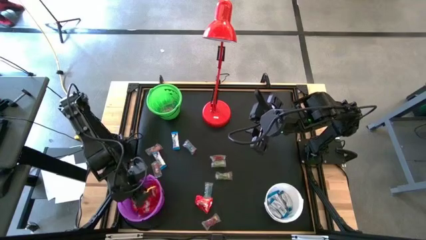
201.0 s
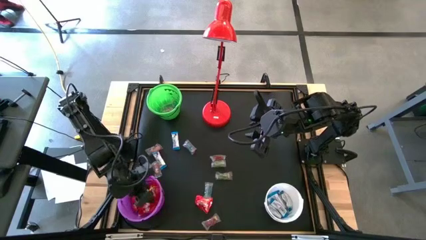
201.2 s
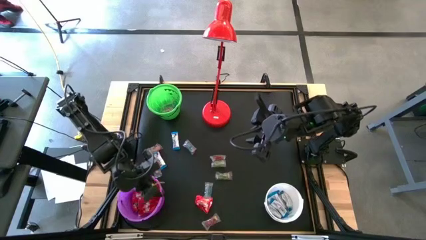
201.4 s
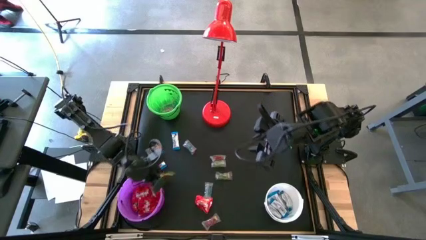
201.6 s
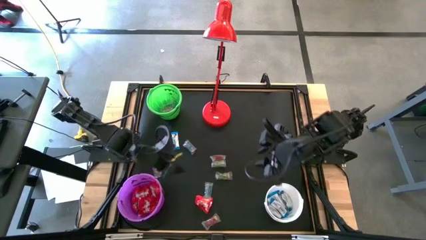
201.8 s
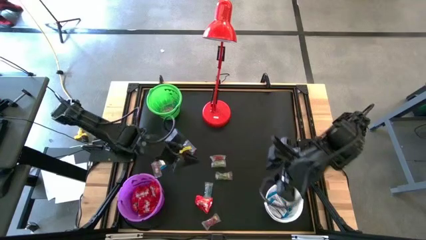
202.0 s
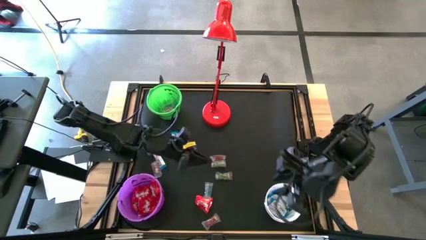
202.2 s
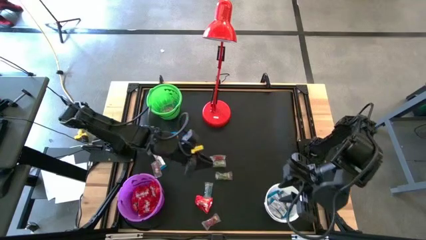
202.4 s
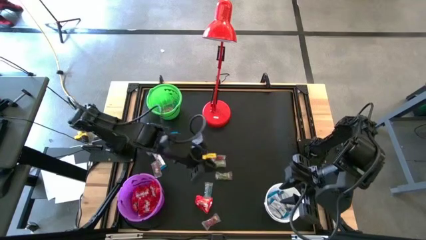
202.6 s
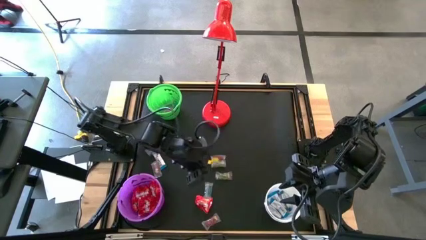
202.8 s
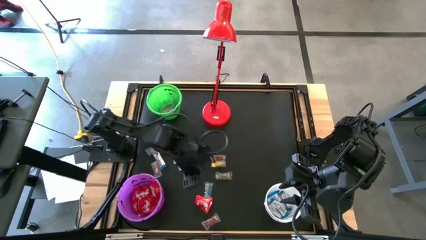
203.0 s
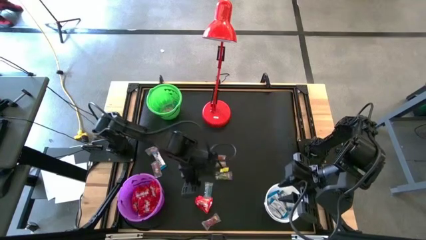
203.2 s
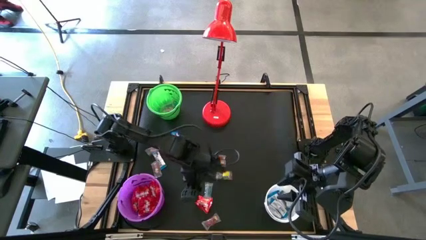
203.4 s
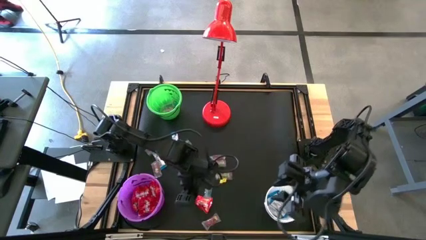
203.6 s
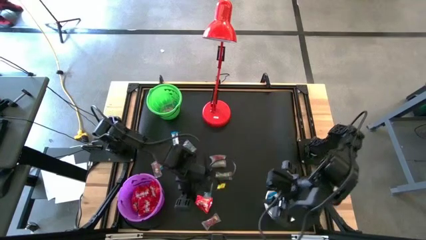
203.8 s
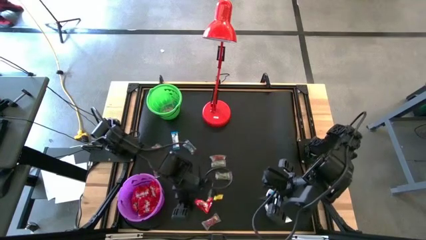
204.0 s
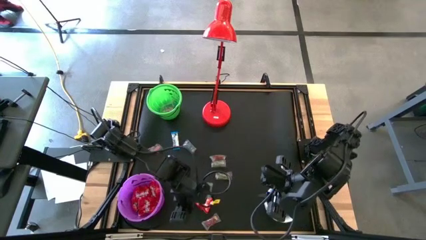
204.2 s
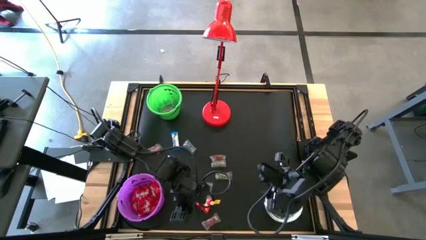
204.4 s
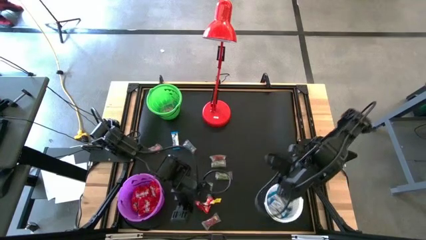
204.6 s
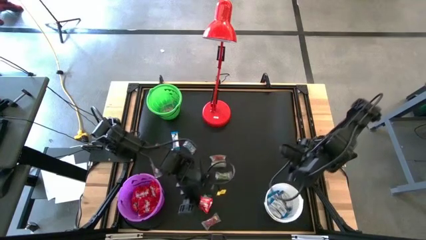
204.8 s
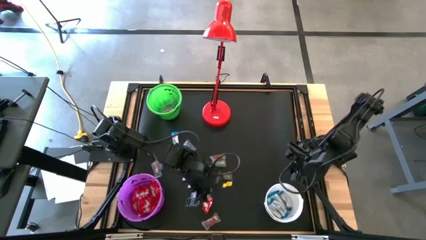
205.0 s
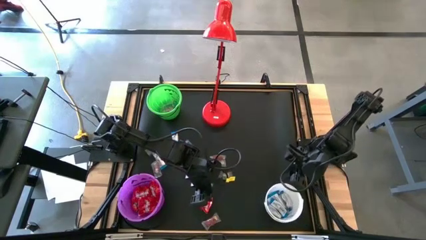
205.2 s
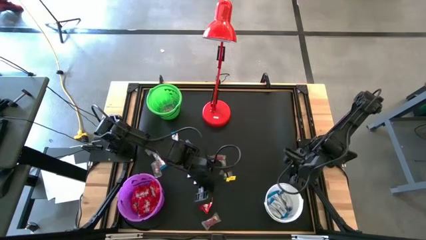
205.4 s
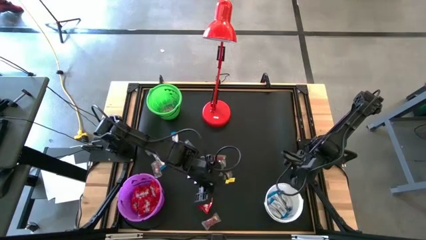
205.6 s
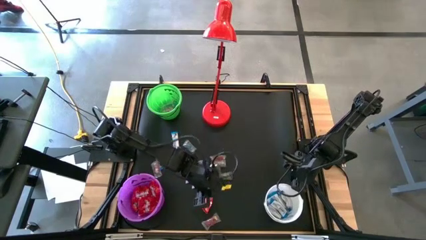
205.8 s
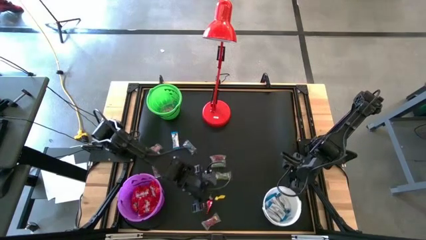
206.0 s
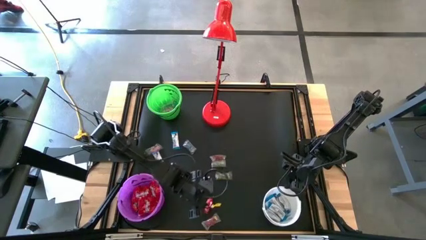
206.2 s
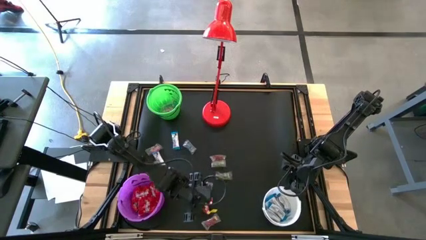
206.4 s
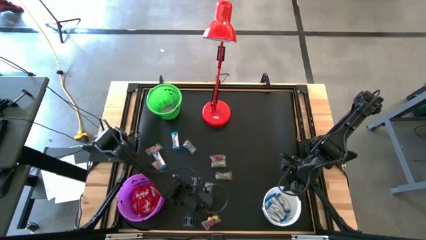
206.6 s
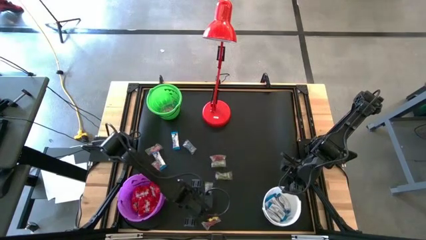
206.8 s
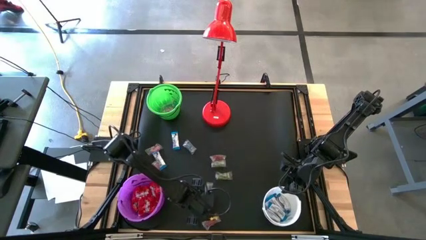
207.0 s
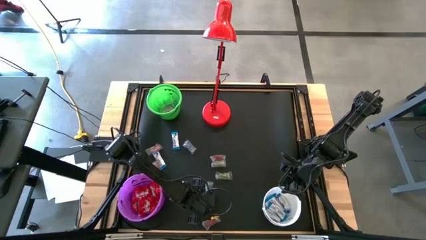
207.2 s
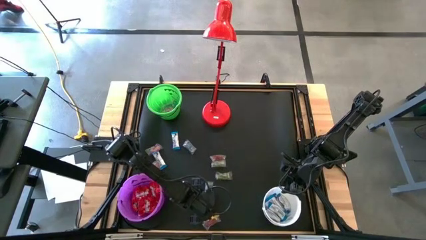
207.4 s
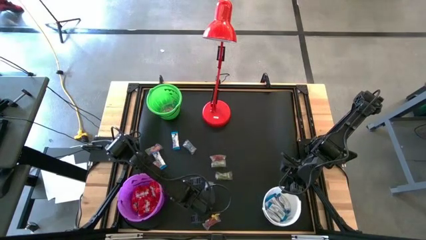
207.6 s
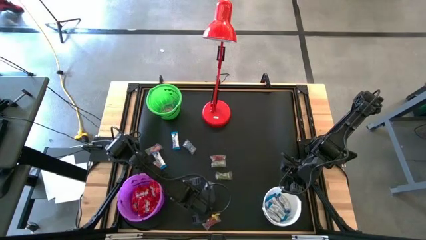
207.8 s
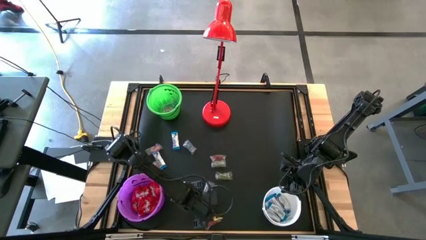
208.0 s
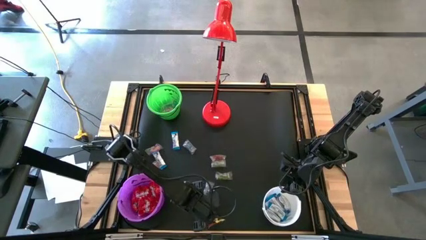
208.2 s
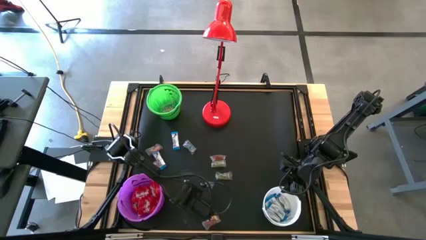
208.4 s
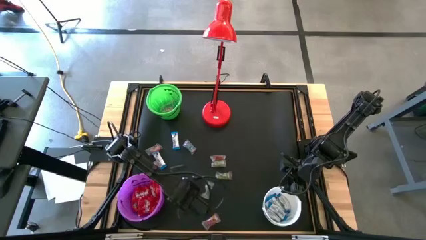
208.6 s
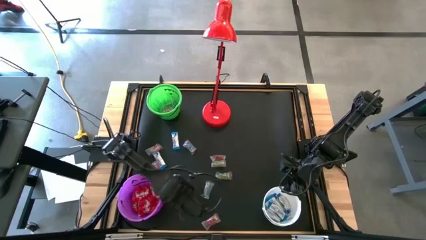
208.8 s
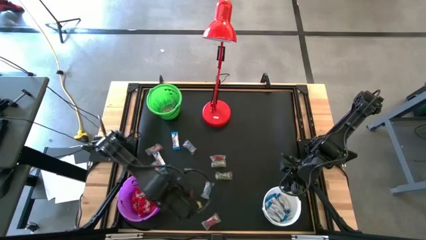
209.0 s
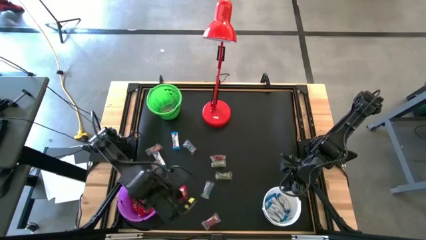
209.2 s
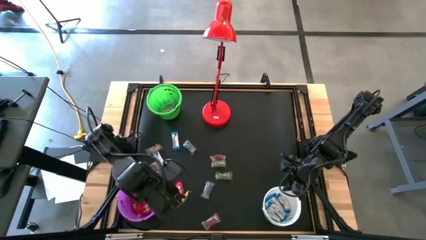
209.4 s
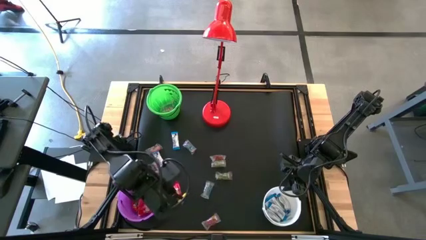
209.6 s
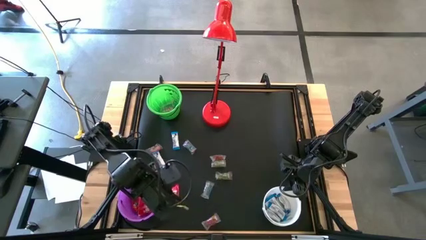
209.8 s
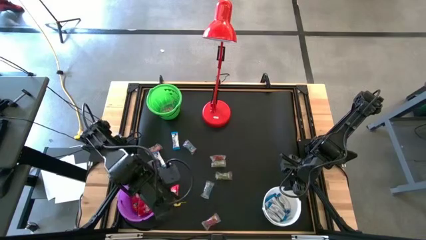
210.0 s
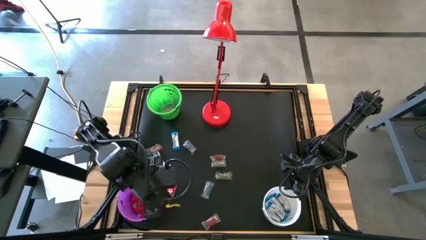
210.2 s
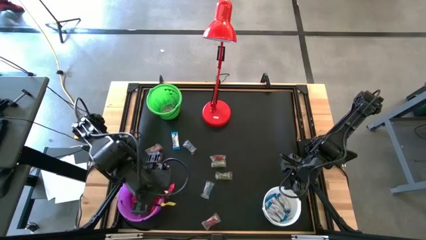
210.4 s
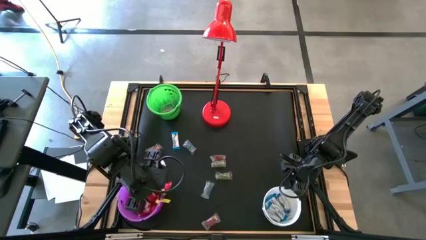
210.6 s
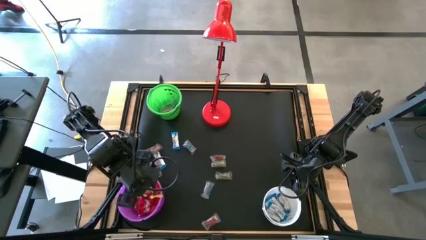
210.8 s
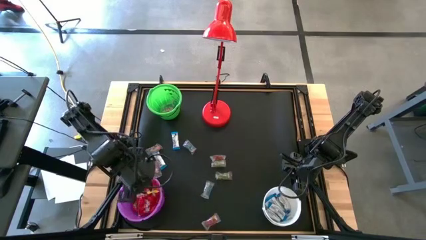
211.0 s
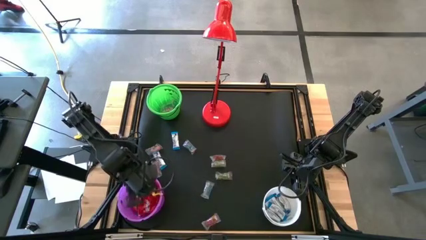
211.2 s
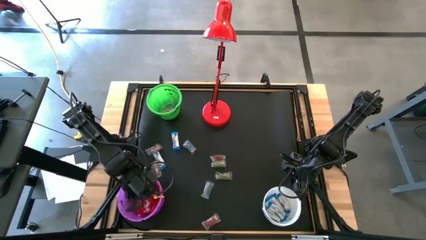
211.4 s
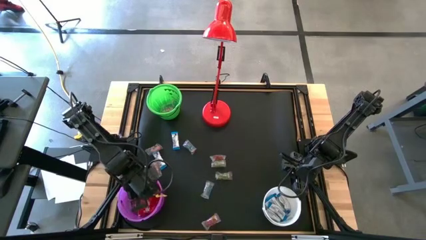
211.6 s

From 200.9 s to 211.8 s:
Task: Sort candy
Put the red candy into the purple bucket

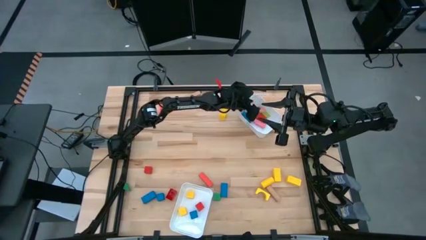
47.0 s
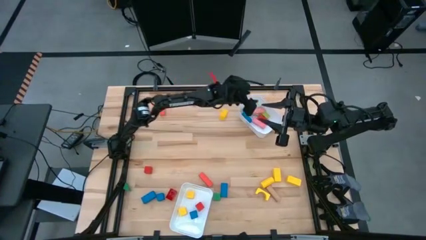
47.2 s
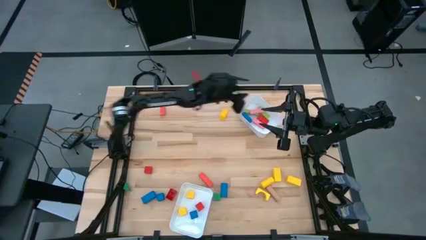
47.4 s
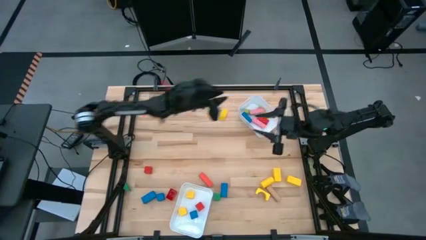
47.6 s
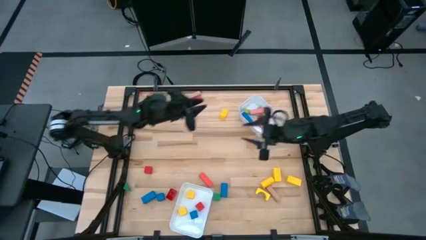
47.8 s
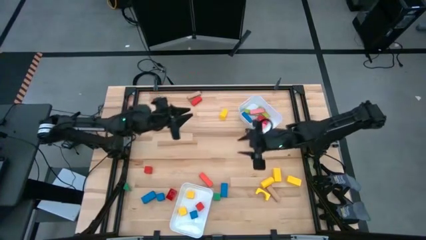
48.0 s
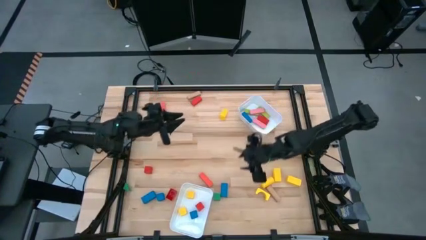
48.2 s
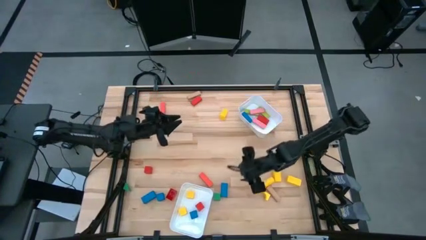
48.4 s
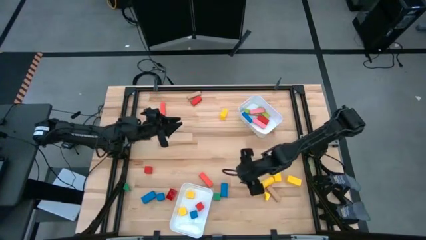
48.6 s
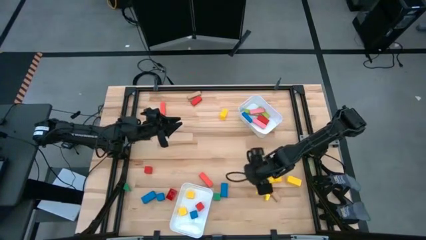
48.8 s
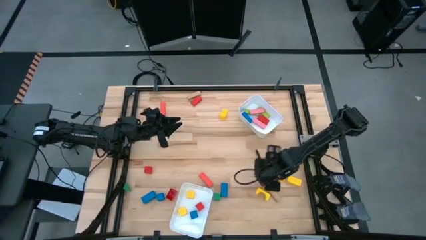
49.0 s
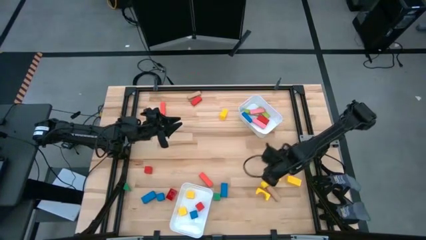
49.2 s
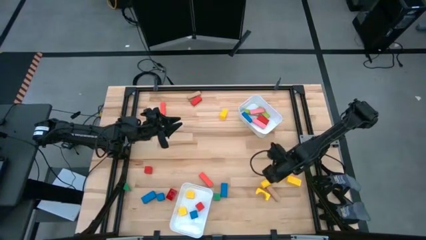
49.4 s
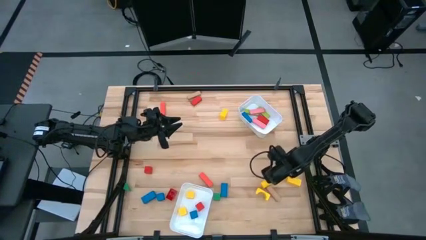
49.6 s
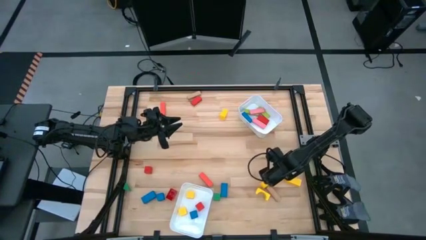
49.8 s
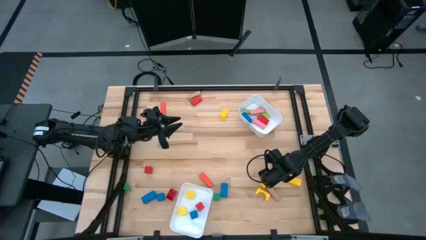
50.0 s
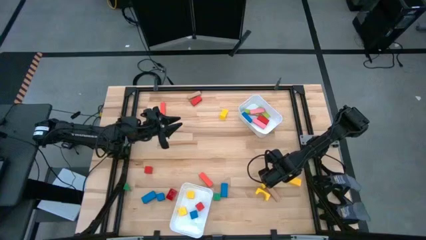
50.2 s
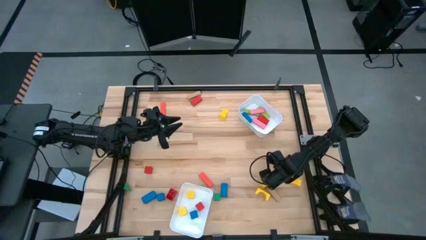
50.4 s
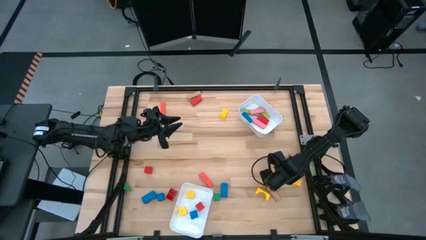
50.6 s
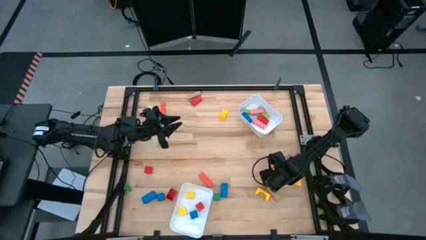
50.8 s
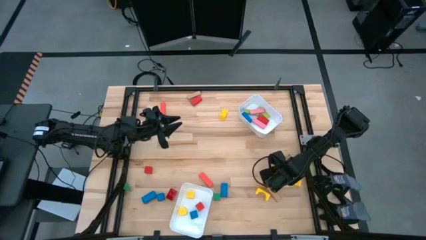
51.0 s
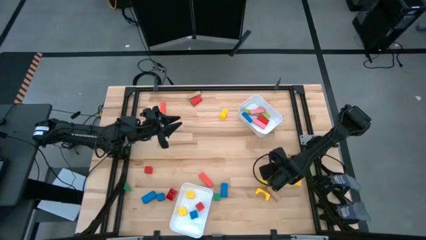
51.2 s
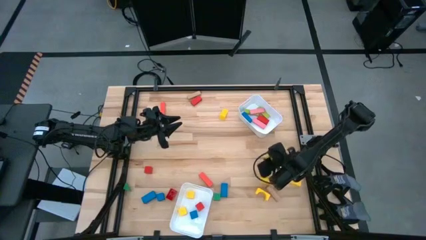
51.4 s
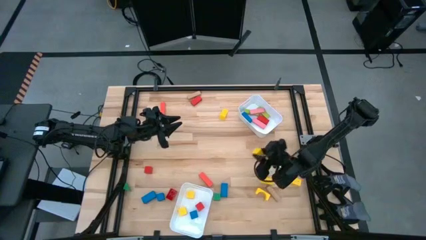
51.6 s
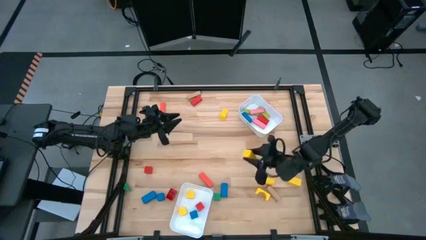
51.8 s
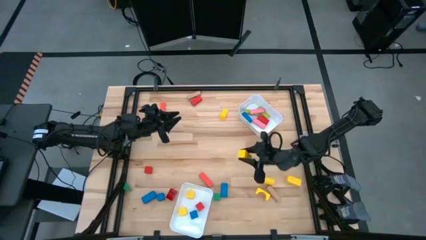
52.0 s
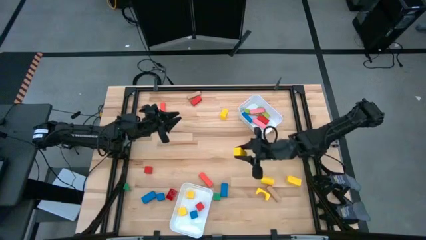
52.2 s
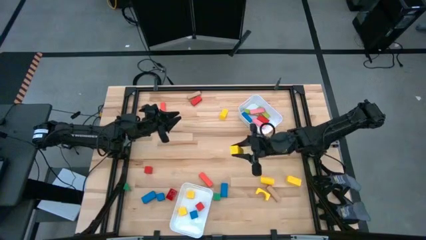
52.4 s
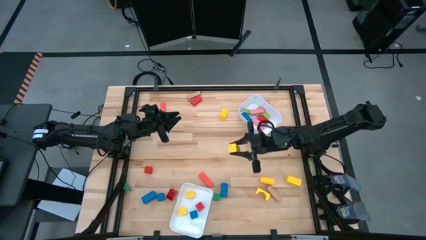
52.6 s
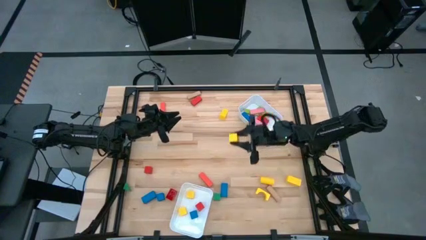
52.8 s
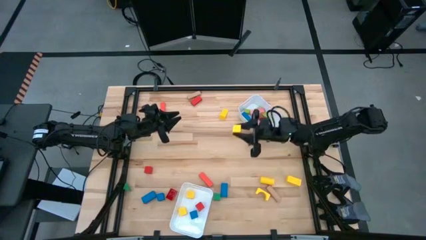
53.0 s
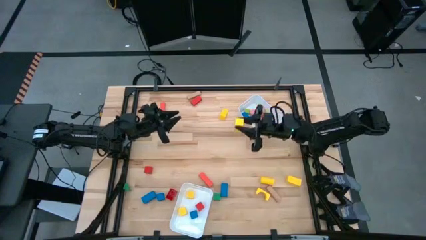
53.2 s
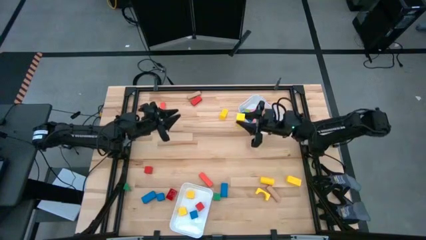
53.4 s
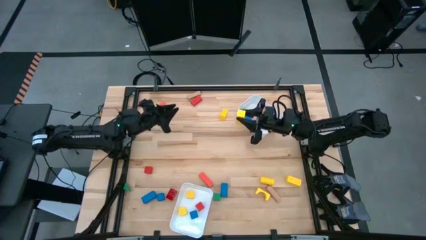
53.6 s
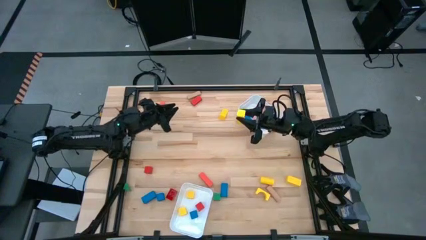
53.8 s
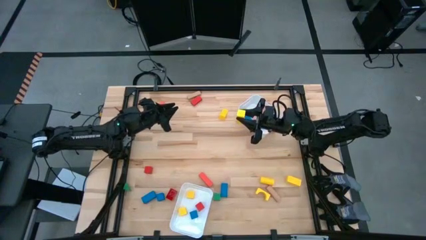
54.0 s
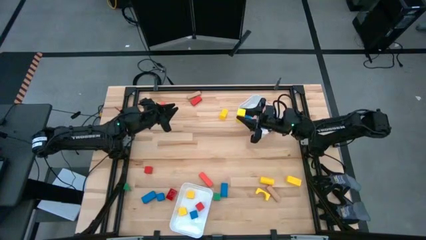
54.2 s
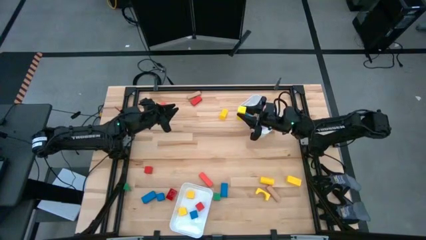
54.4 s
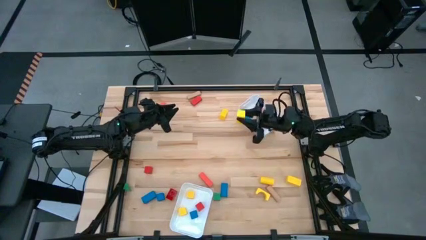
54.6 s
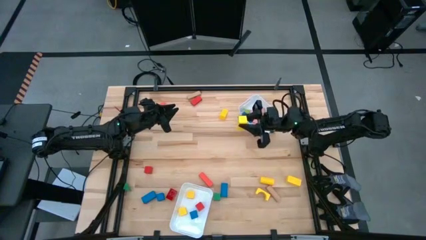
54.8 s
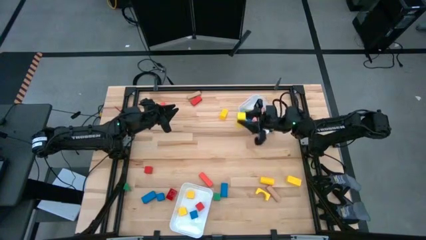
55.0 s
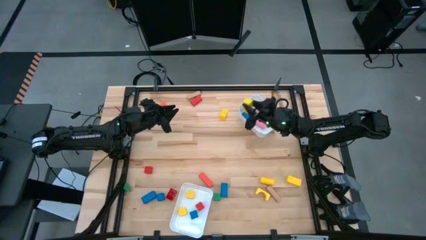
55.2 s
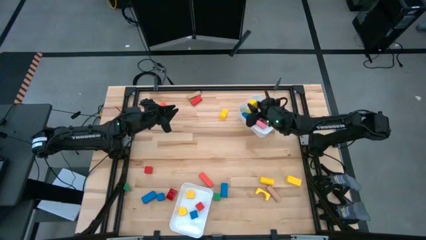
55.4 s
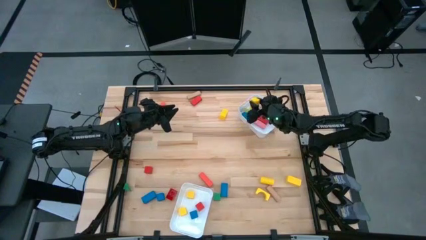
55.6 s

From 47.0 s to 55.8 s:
Task: Sort blocks by size
Put the yellow rectangle block into the top white bin
